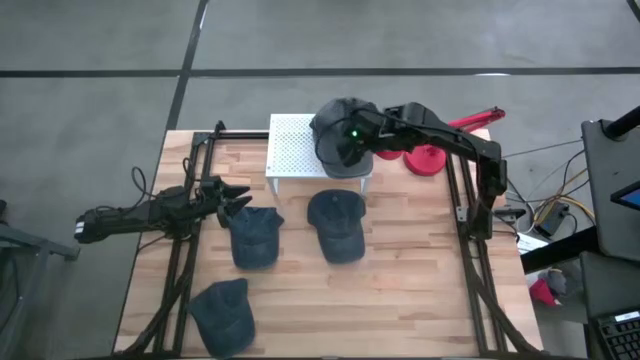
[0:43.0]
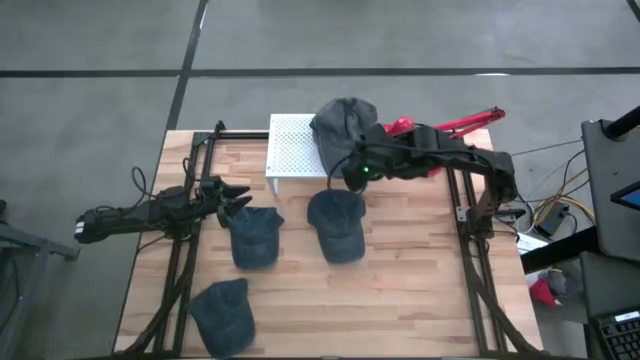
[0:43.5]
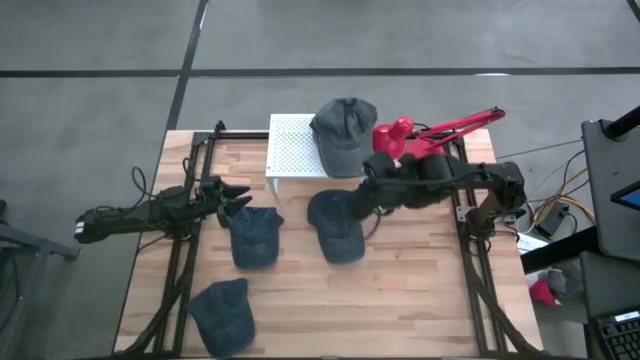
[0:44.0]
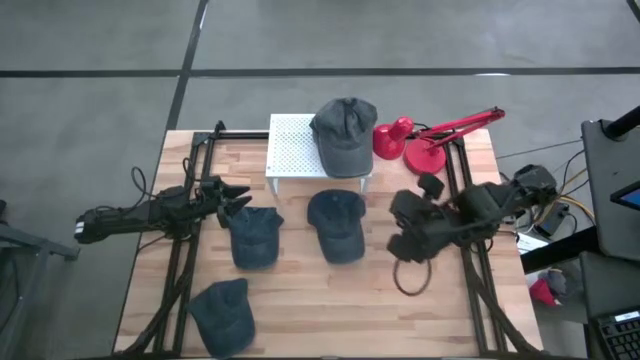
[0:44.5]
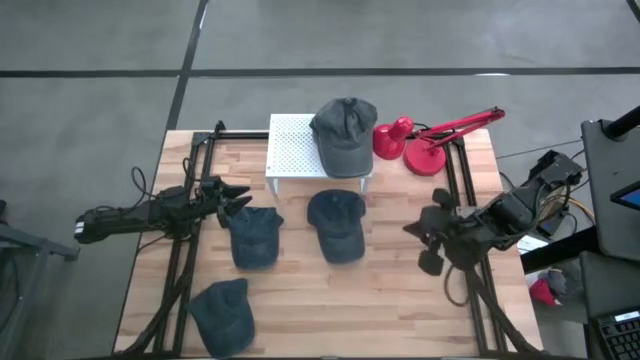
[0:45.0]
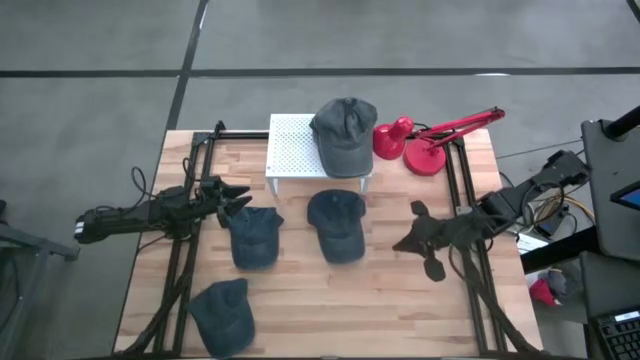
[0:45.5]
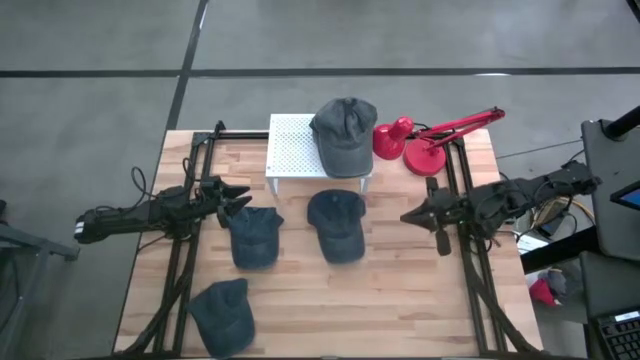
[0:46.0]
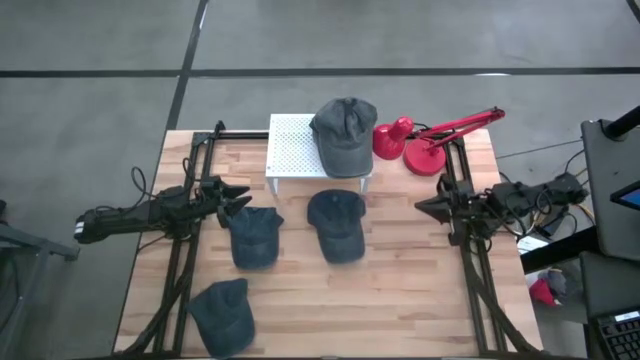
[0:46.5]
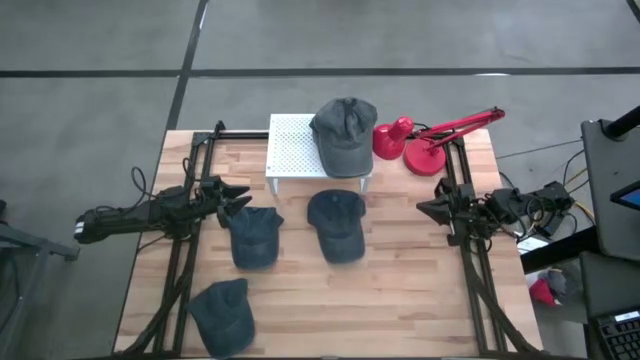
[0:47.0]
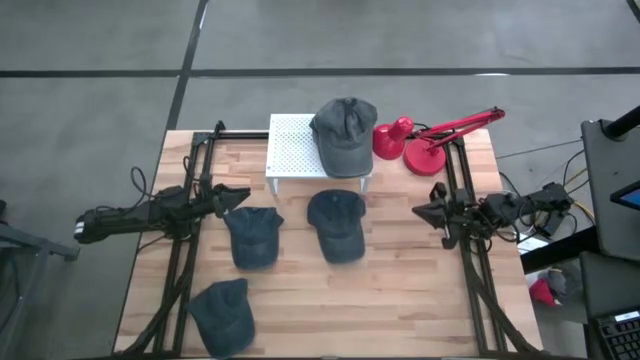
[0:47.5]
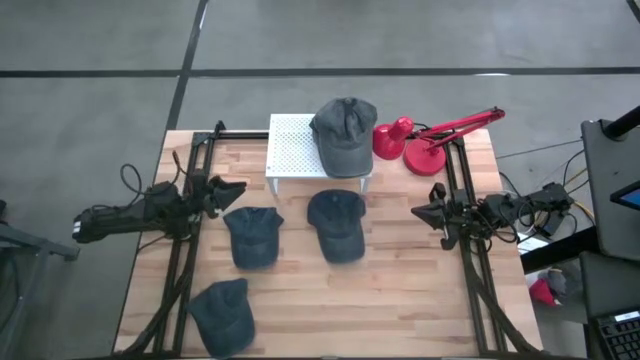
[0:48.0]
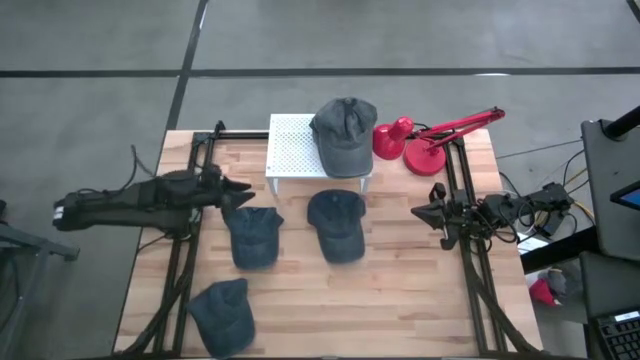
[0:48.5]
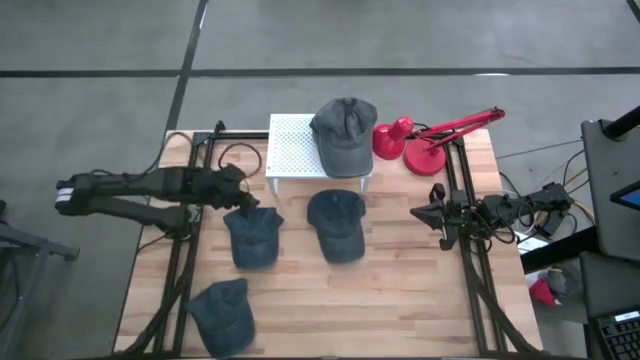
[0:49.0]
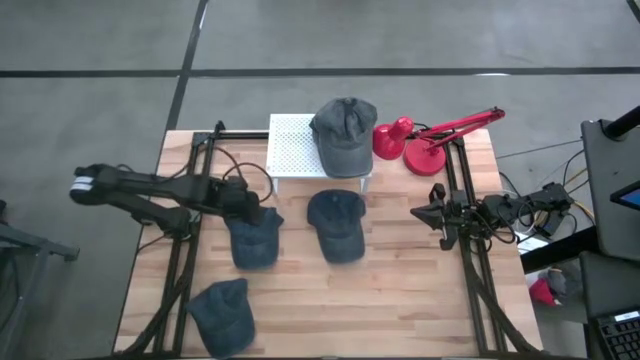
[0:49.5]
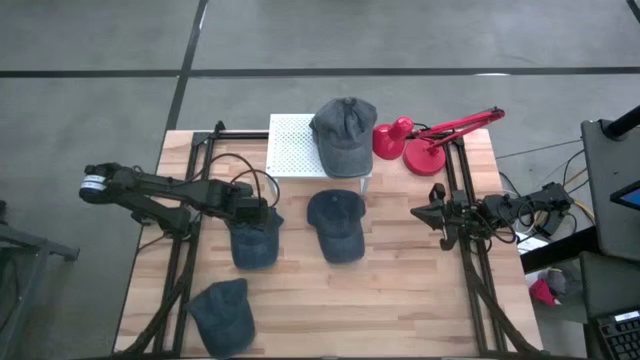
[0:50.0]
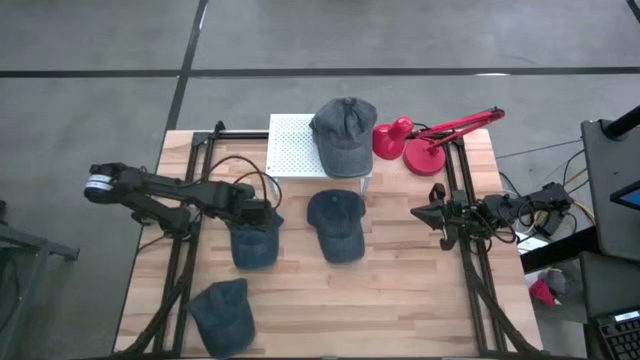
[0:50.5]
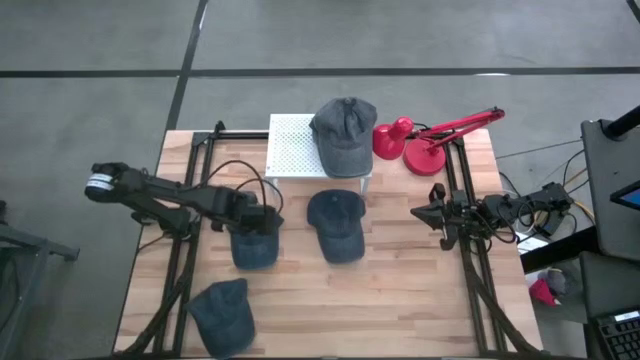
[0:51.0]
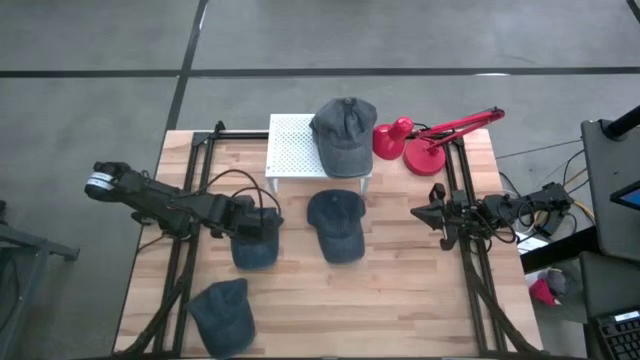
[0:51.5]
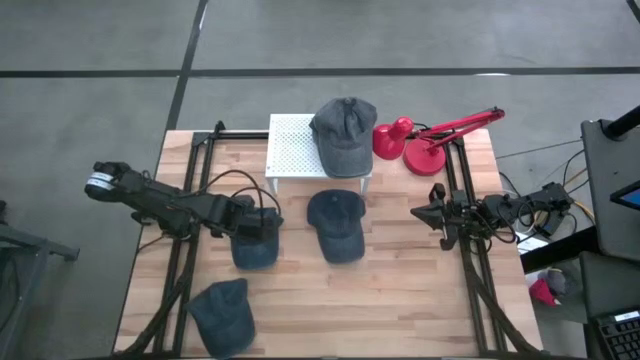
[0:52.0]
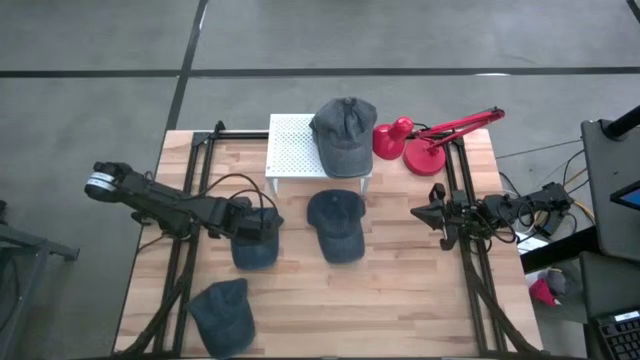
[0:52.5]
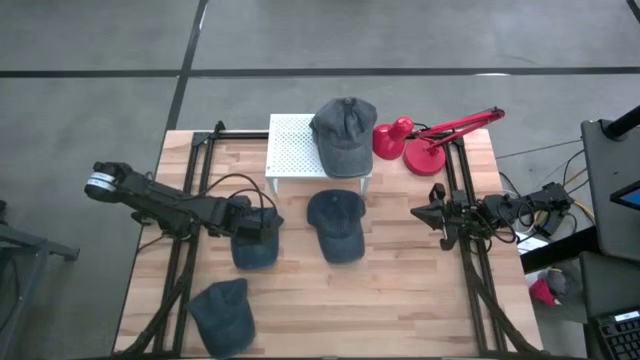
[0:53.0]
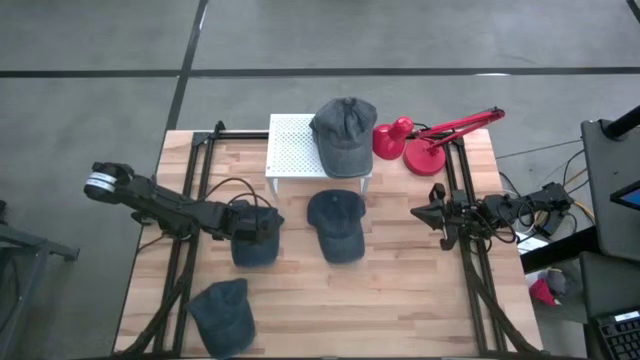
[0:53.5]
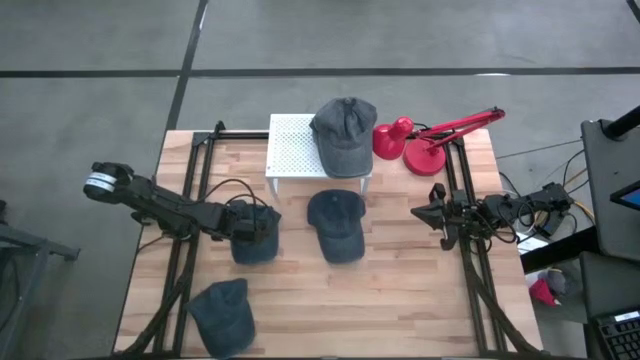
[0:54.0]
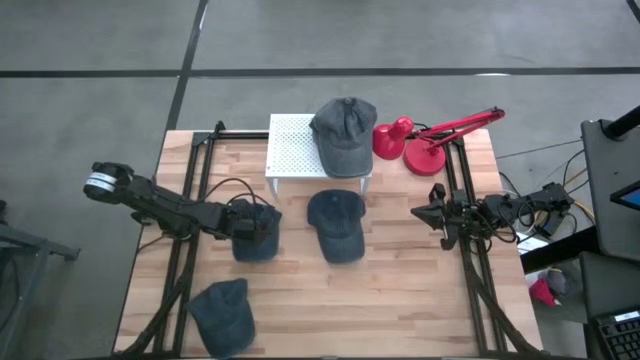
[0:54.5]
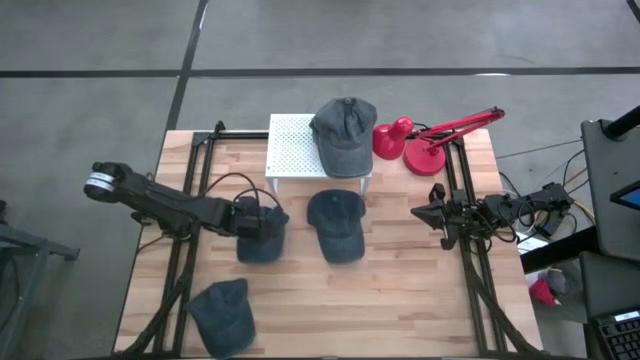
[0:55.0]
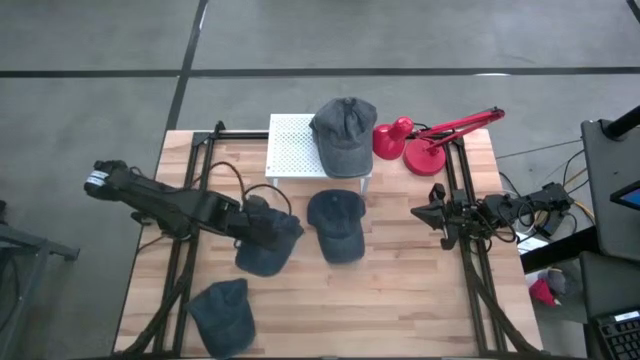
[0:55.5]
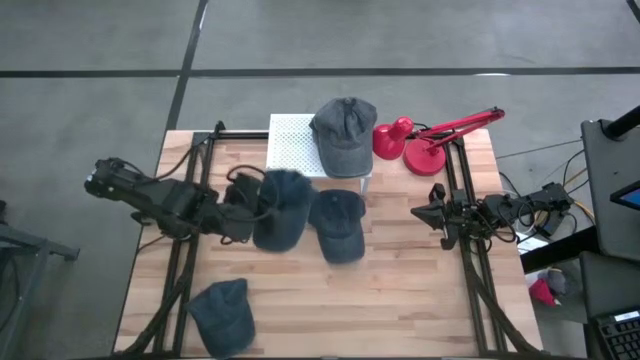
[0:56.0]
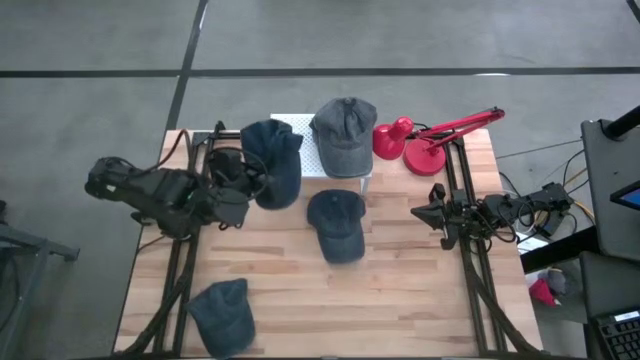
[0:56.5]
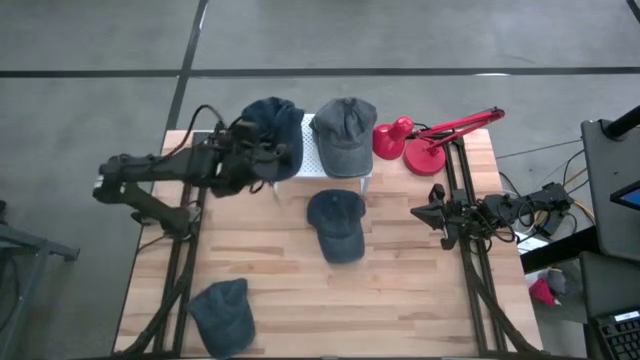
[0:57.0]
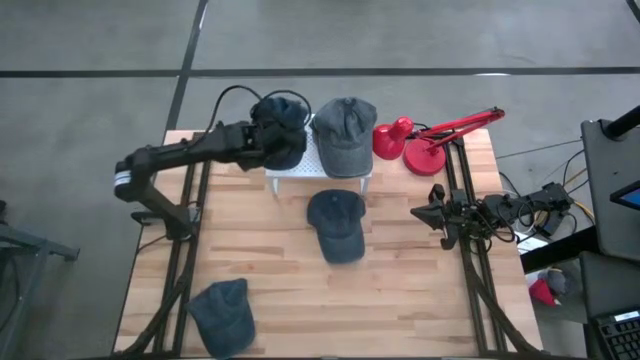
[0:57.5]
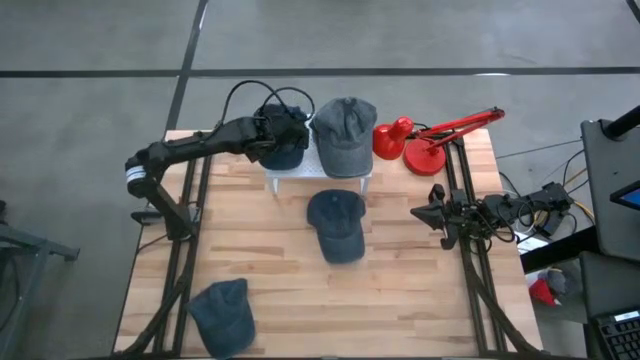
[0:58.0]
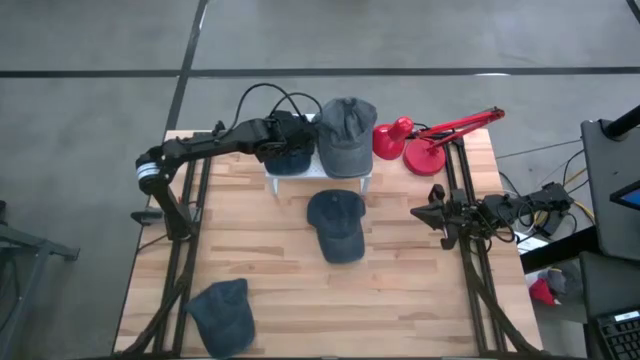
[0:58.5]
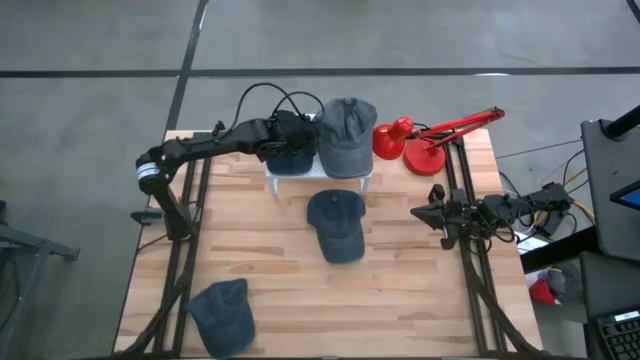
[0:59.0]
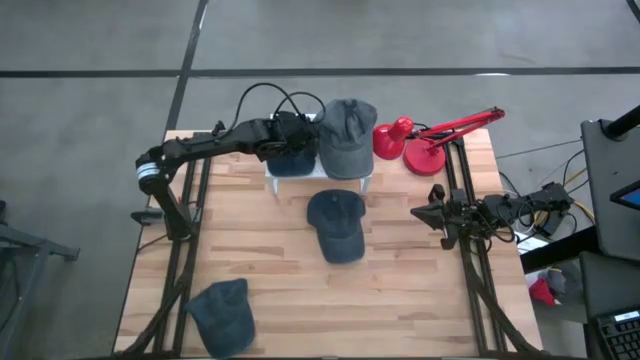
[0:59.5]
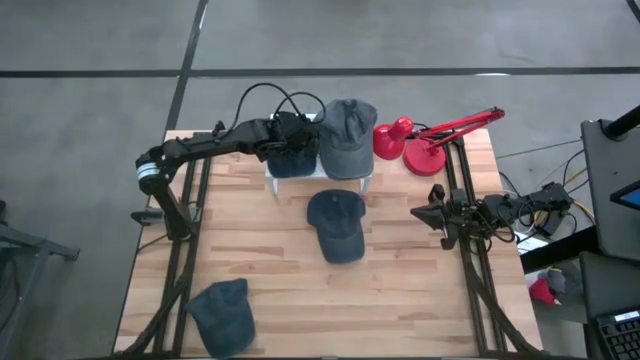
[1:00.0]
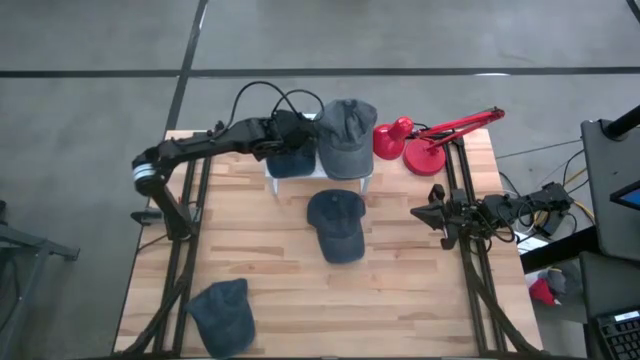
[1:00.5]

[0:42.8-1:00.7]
Task: Pick & Place hat
Put the middle blue cap on the shelf

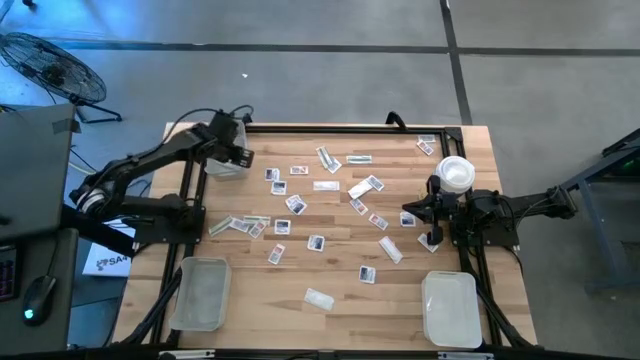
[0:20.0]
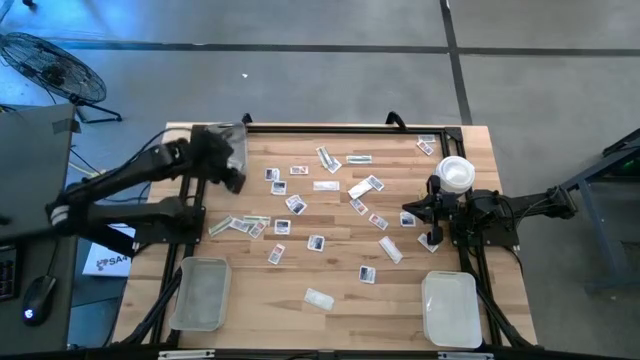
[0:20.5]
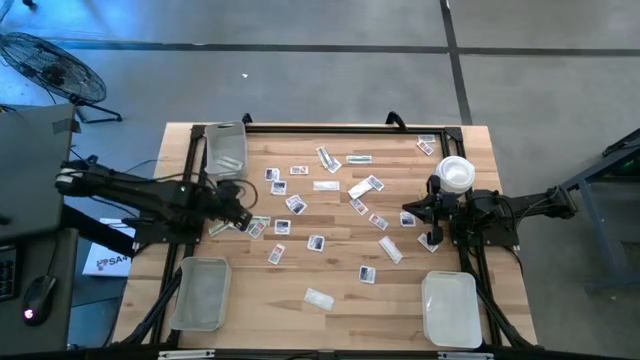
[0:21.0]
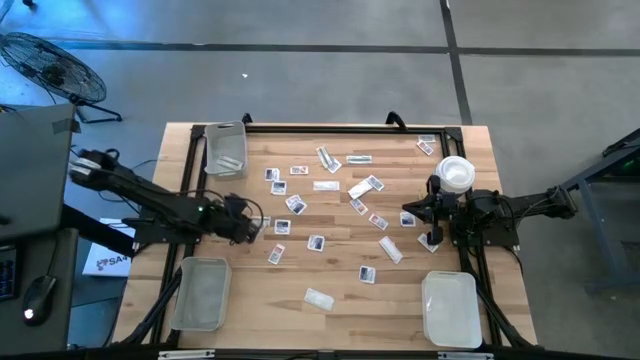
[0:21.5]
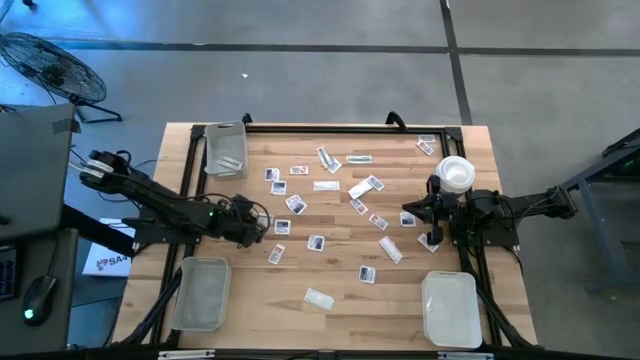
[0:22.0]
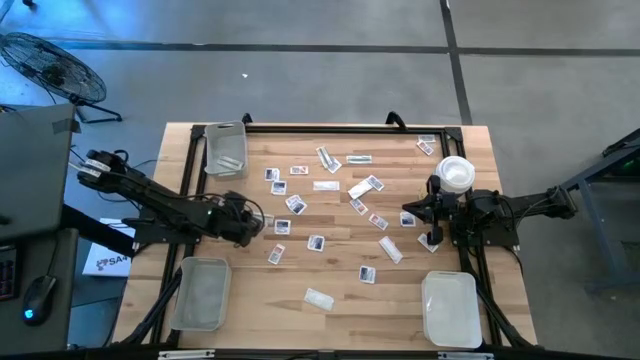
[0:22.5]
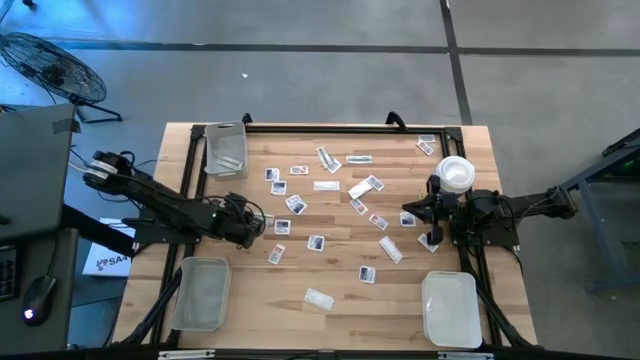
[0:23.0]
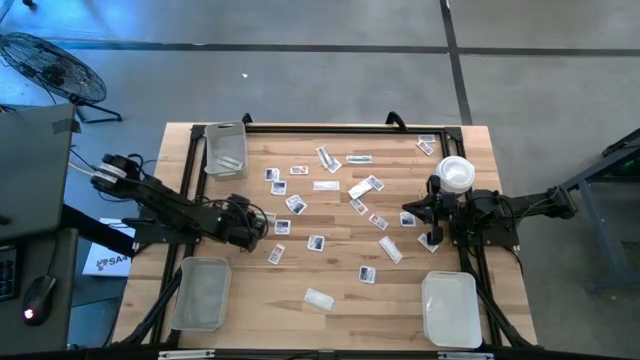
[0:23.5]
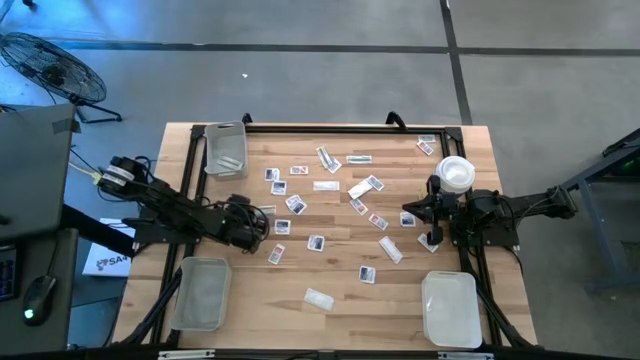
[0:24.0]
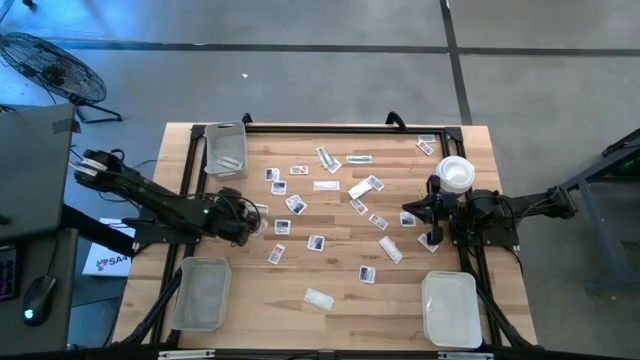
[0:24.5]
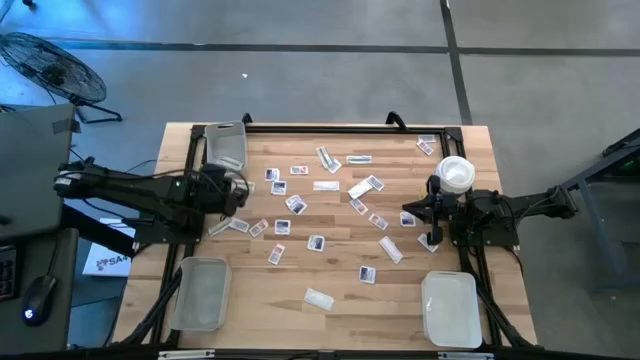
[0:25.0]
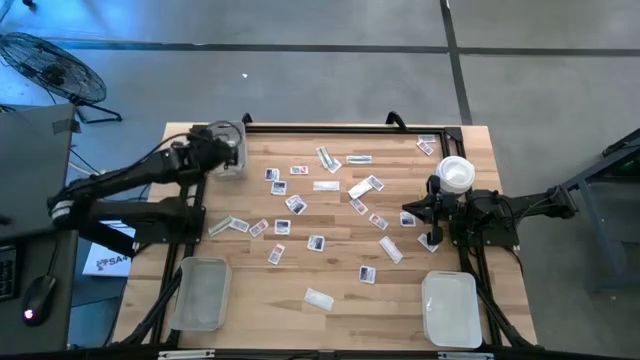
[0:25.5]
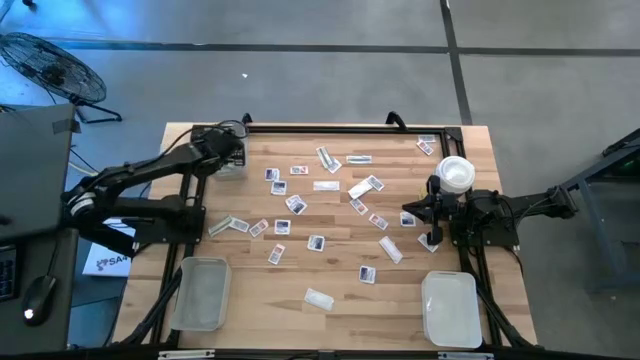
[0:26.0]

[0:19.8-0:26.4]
Task: Pick & Place First Aid Supplies
Put the green bandage pack into the top gray bin
